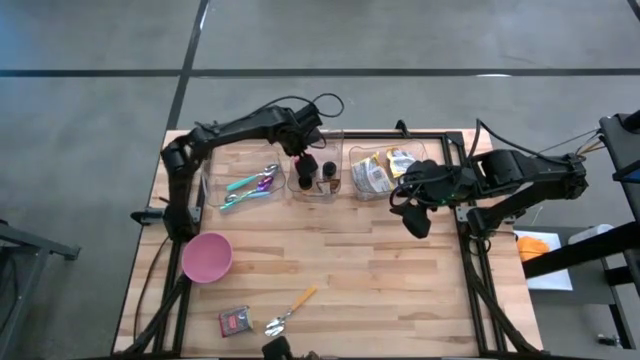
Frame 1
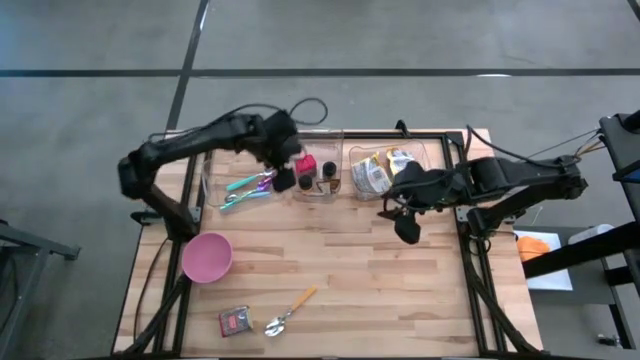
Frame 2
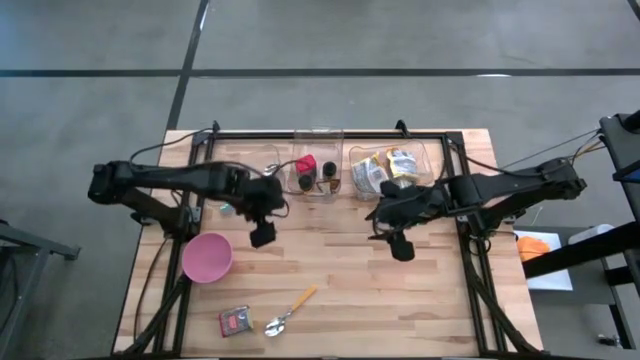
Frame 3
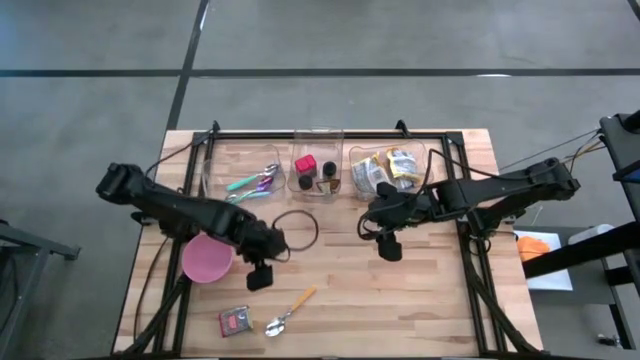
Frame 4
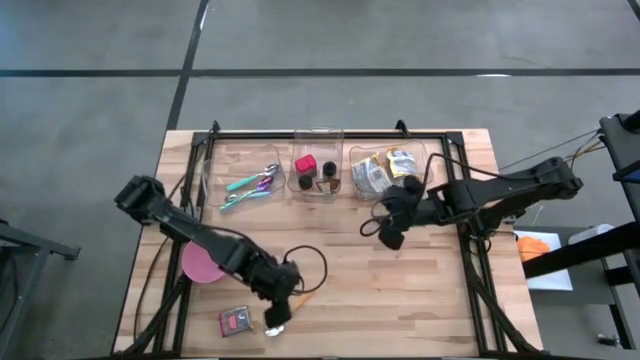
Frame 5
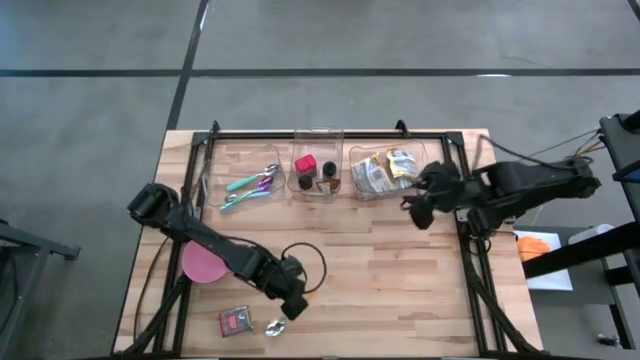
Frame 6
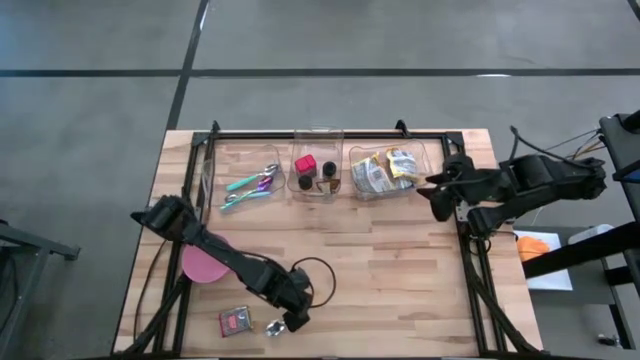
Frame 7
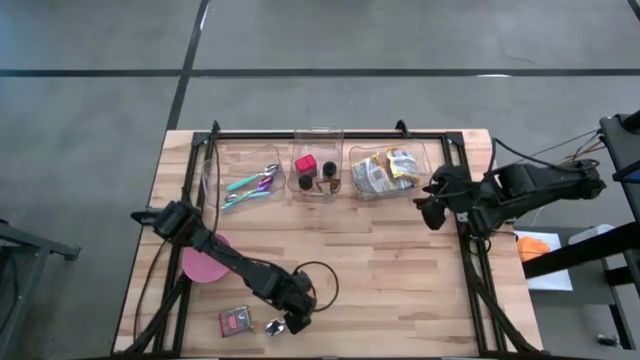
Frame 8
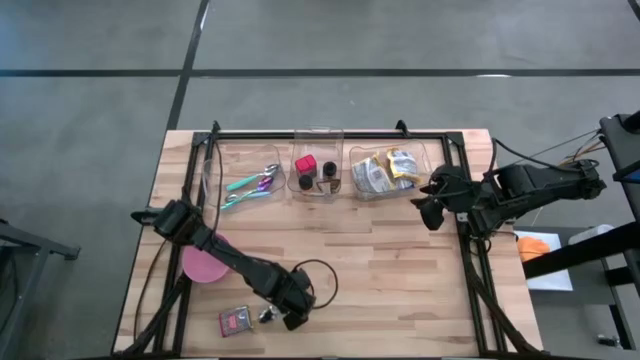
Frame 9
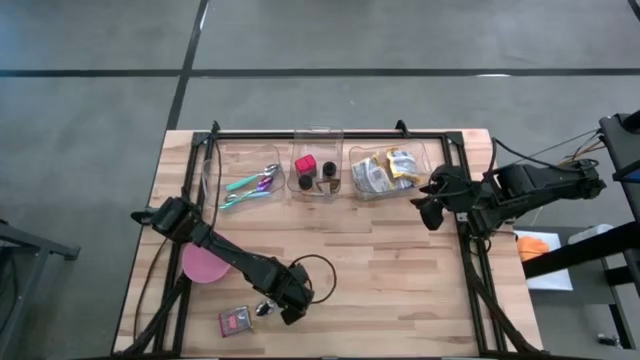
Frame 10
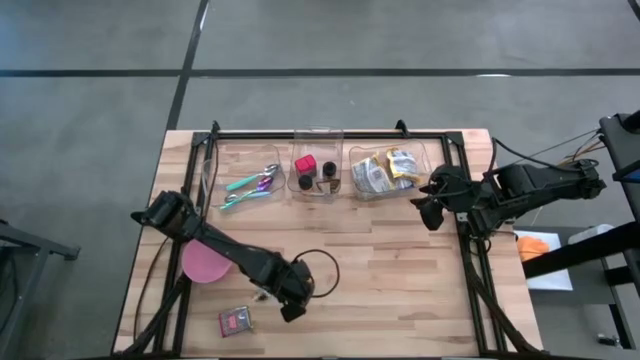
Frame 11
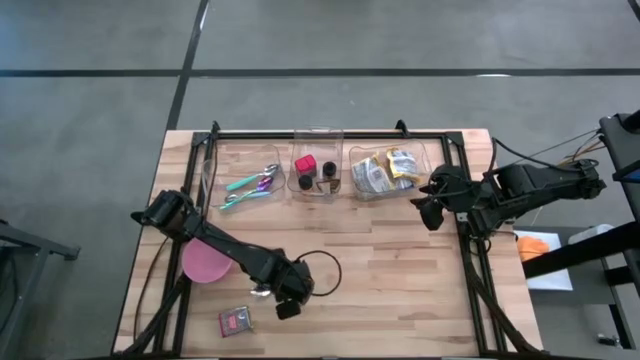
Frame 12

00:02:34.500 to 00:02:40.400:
Put the yellow spoon into the left transparent bin

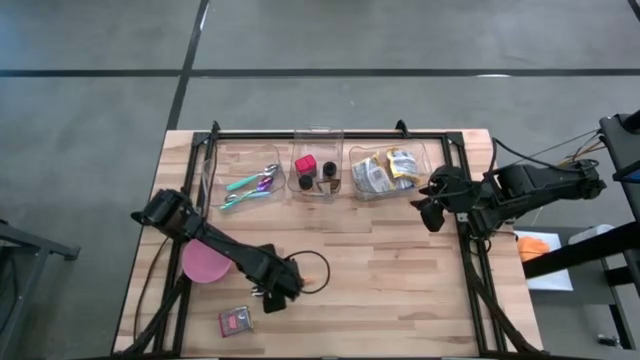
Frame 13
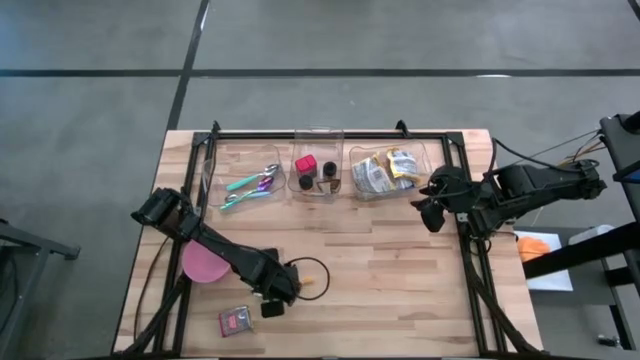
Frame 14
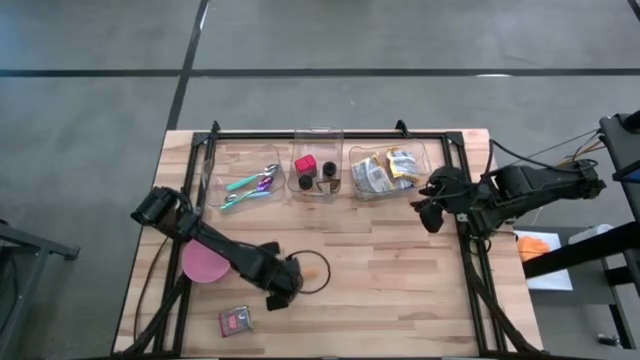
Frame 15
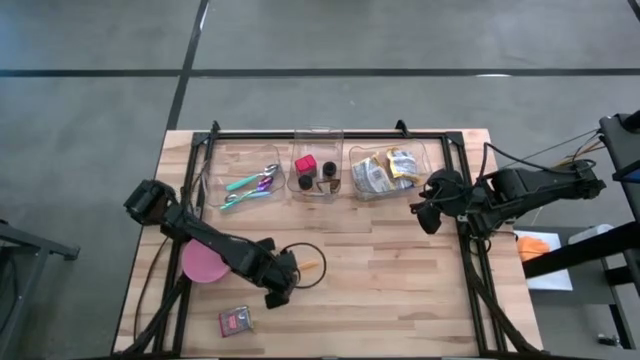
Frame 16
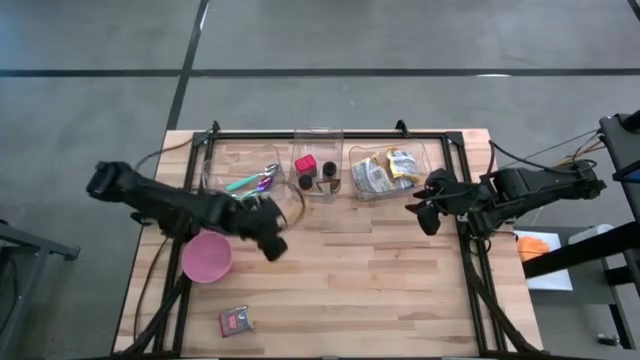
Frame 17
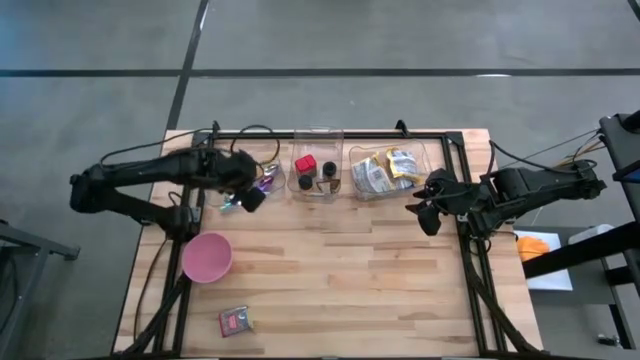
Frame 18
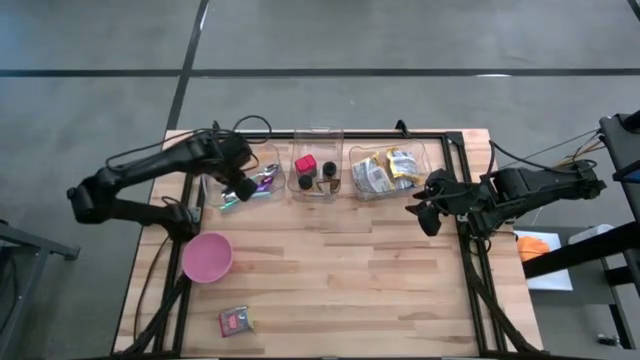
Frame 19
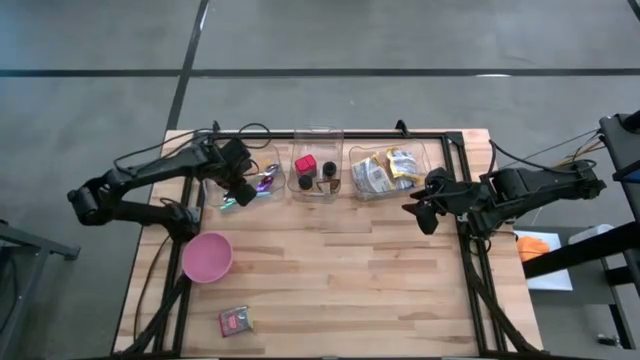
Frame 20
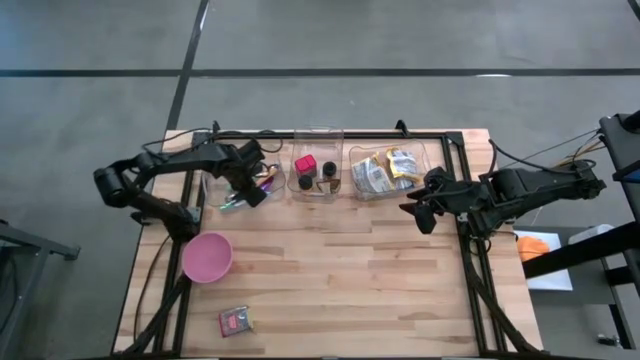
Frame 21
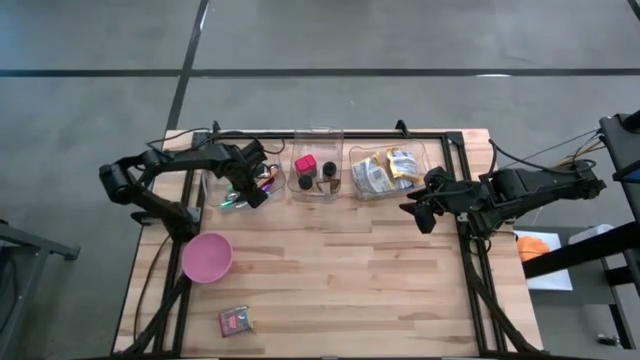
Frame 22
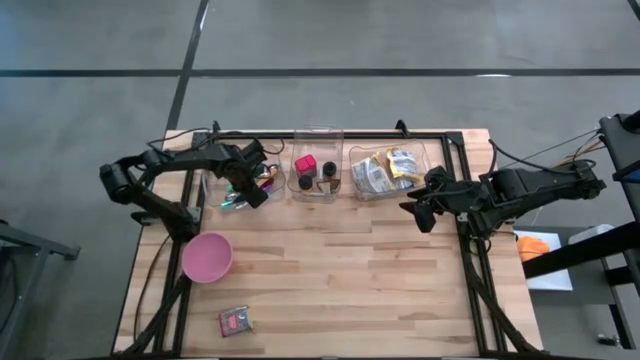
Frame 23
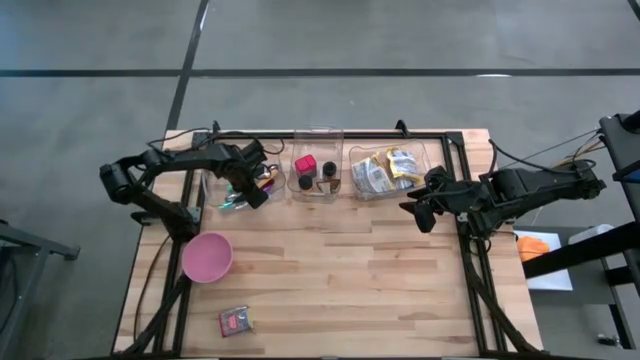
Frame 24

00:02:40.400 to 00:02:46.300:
Put the yellow spoon into the left transparent bin

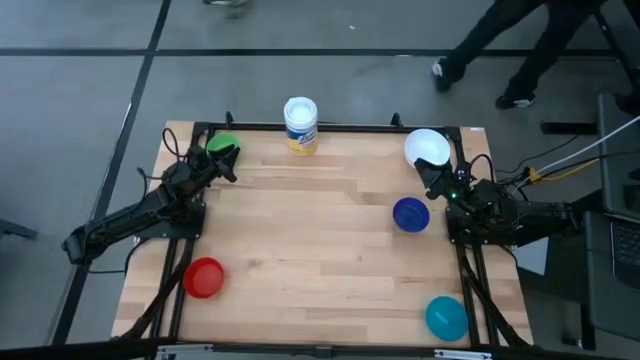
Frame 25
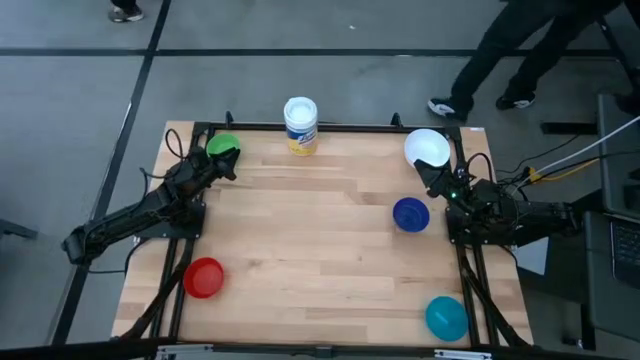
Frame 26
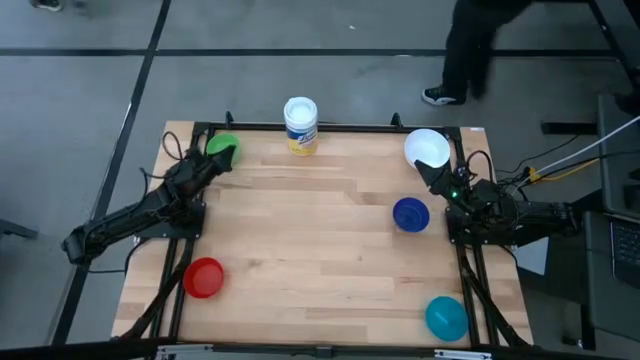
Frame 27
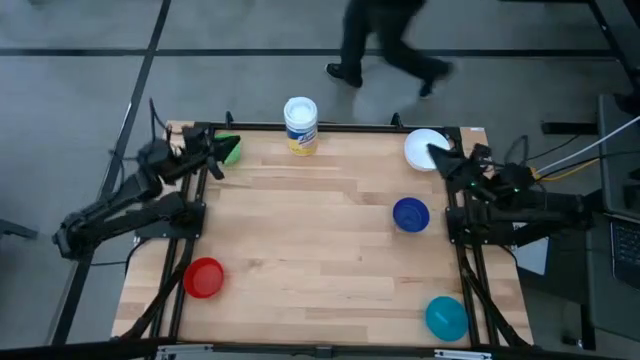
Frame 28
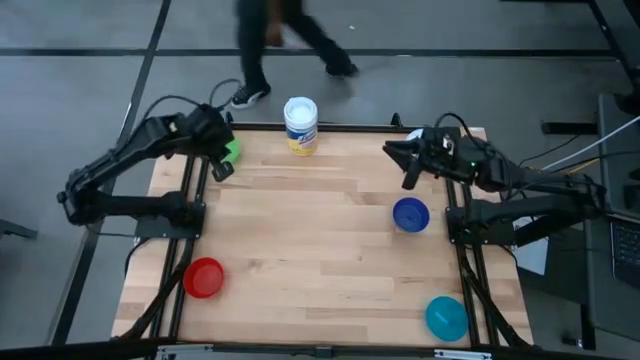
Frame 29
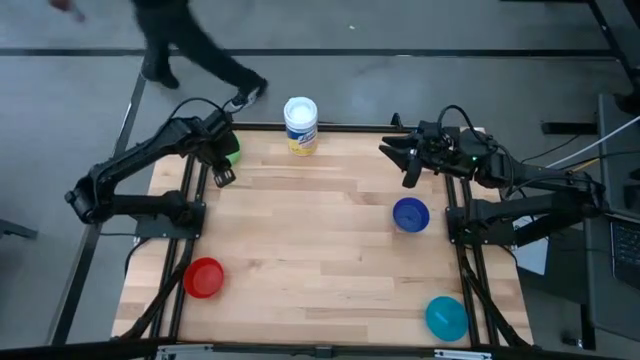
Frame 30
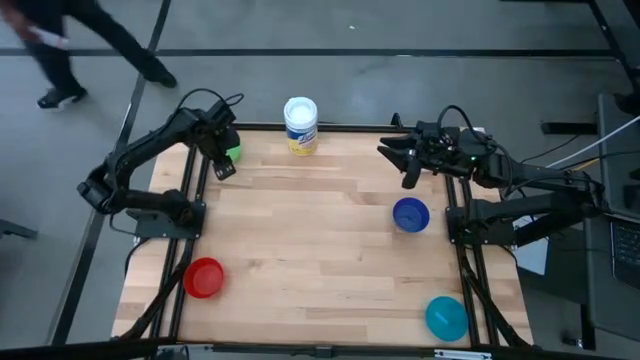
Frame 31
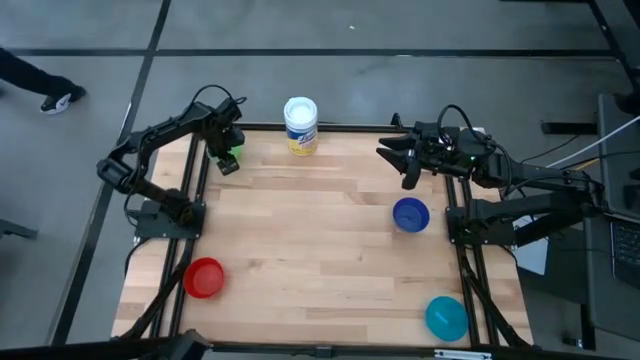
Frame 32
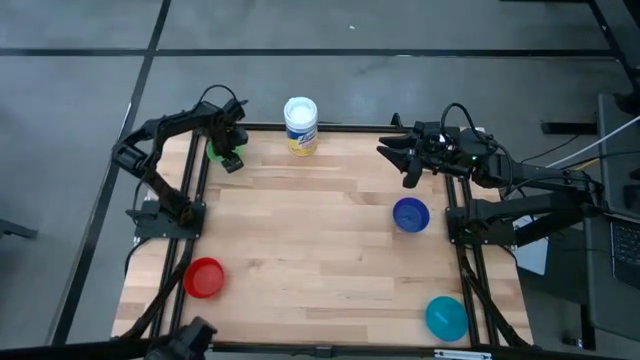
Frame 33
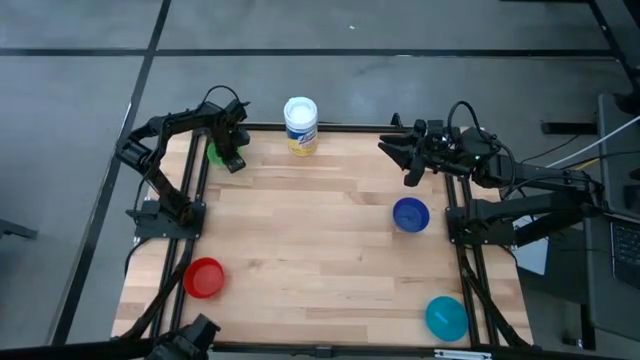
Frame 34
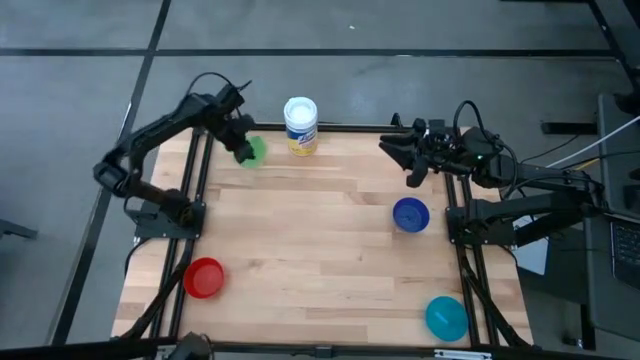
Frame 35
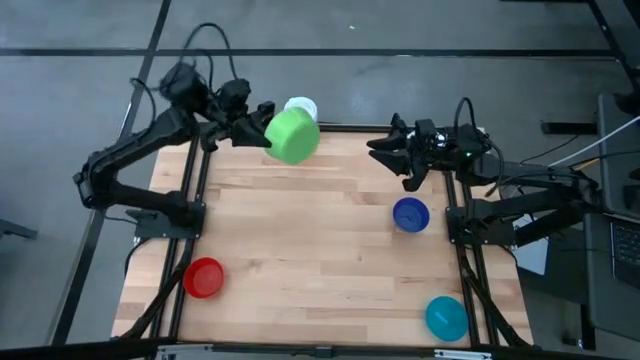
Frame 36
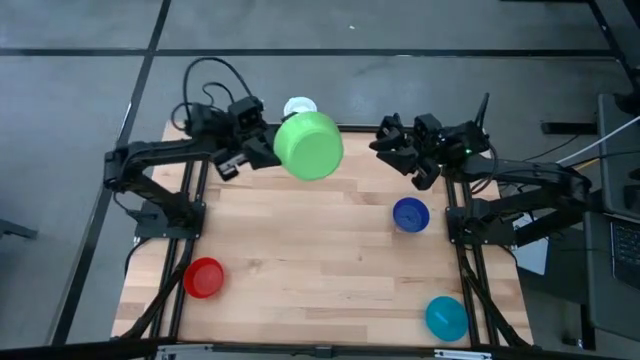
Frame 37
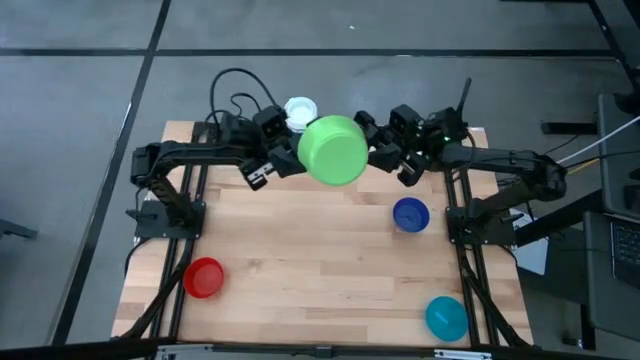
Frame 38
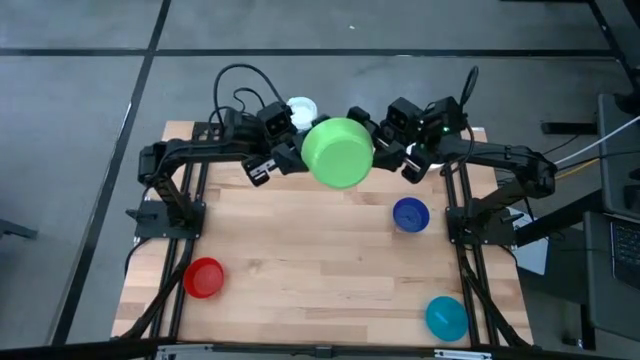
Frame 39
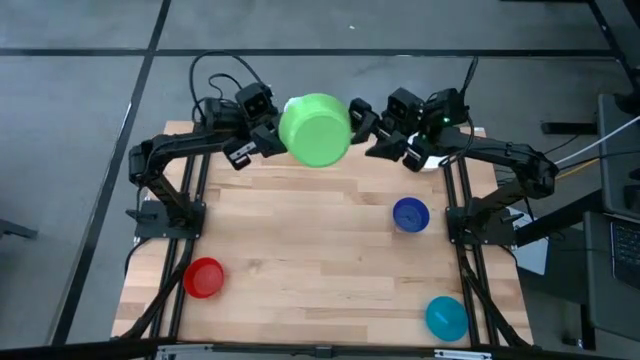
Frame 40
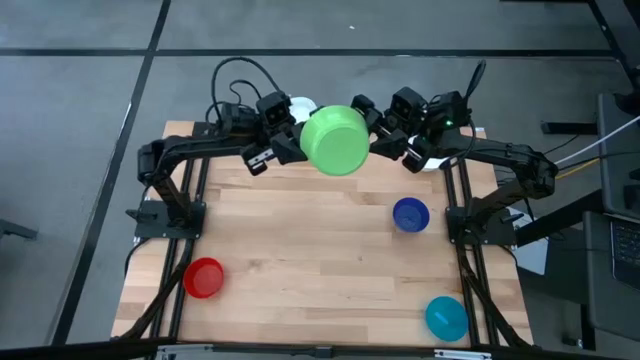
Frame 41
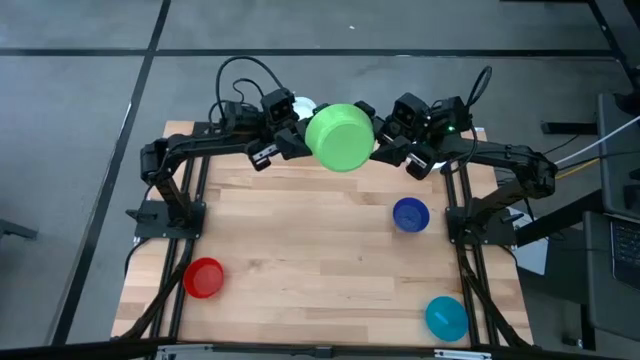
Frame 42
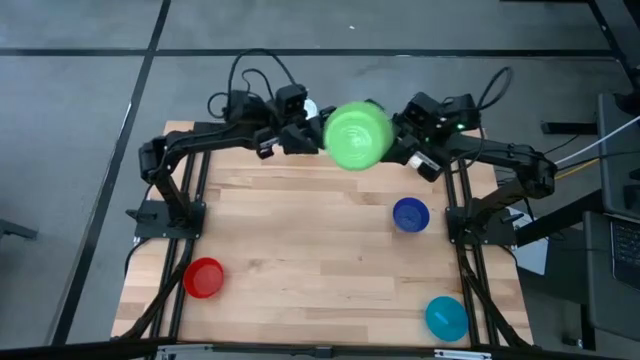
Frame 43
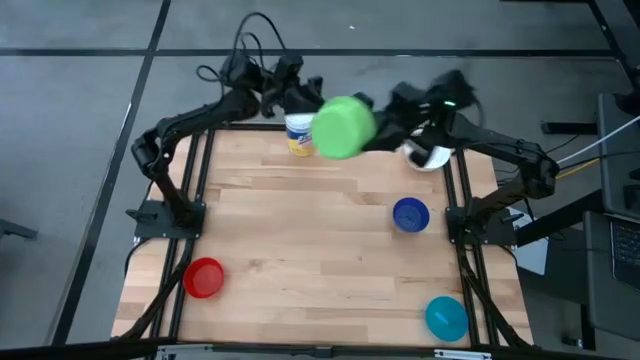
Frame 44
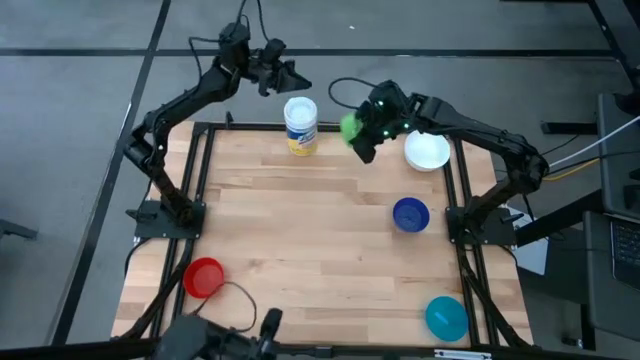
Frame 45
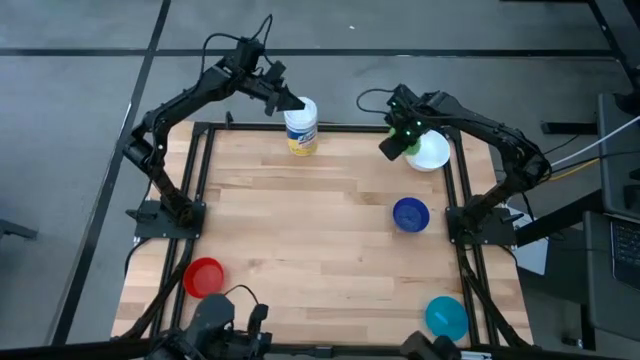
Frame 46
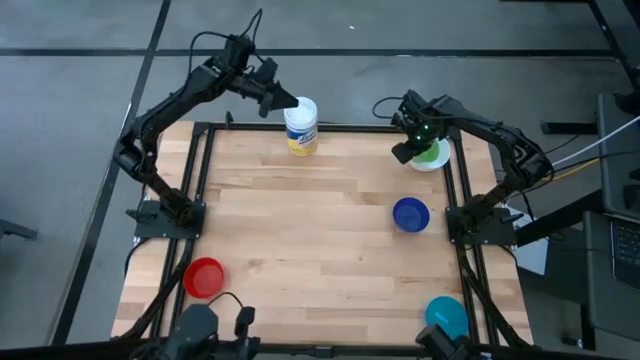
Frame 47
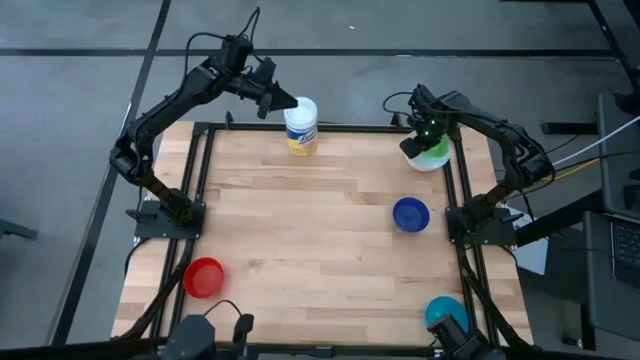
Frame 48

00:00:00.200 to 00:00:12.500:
Stack the green bowl on the white bowl
